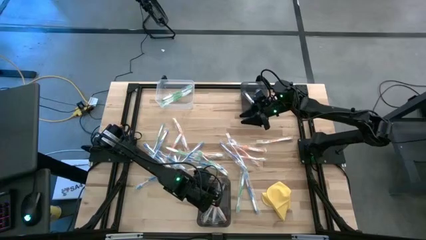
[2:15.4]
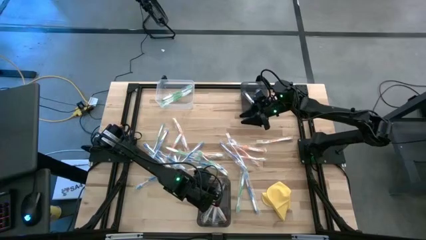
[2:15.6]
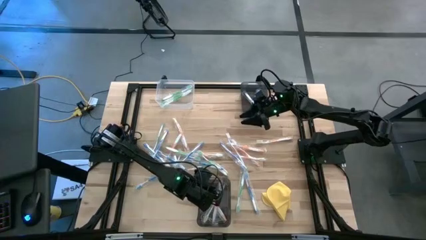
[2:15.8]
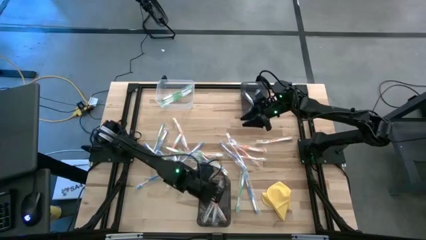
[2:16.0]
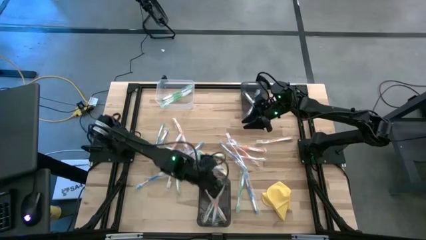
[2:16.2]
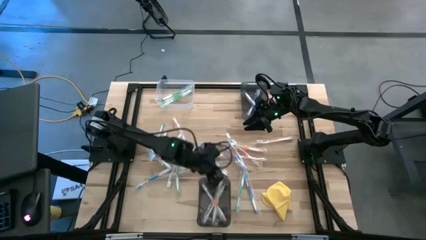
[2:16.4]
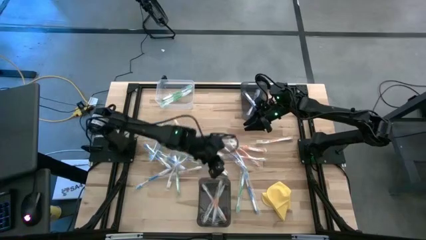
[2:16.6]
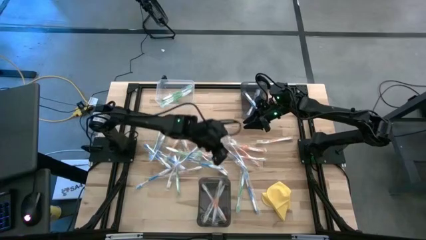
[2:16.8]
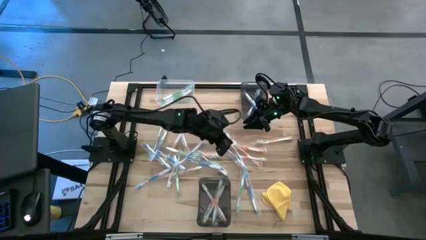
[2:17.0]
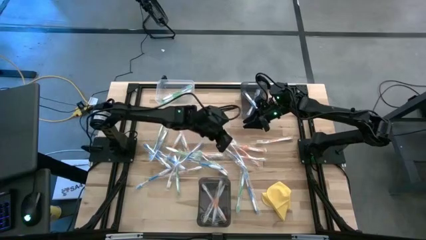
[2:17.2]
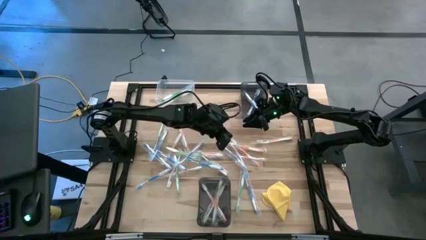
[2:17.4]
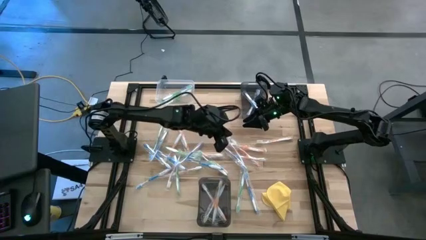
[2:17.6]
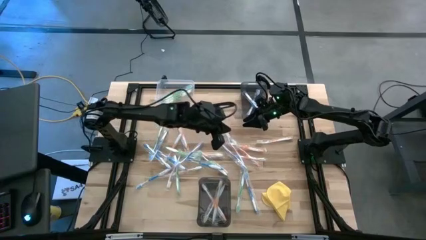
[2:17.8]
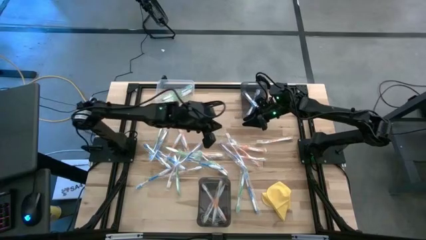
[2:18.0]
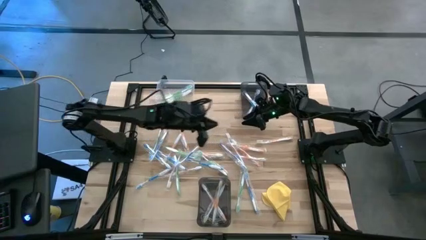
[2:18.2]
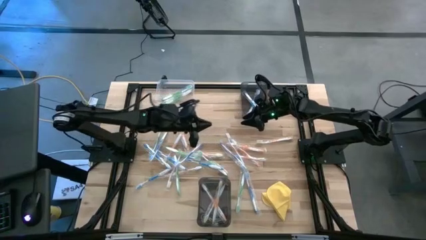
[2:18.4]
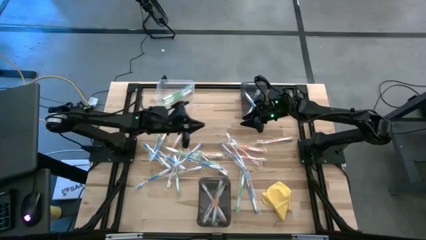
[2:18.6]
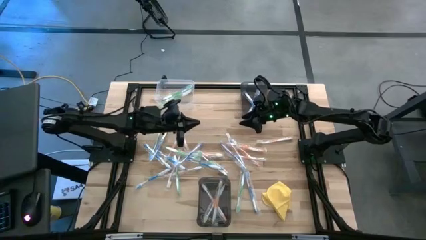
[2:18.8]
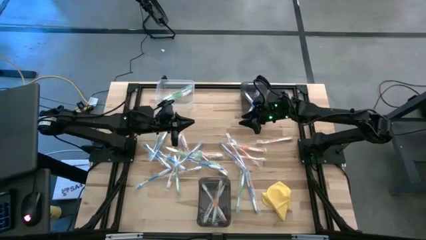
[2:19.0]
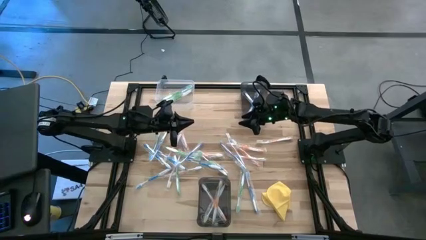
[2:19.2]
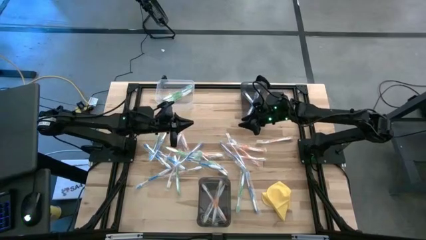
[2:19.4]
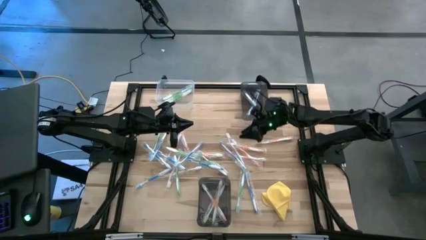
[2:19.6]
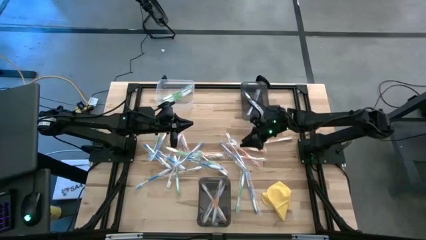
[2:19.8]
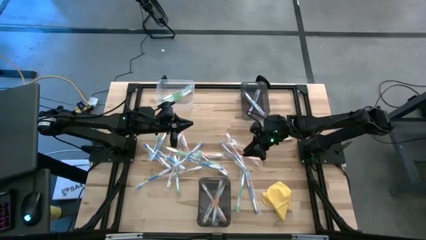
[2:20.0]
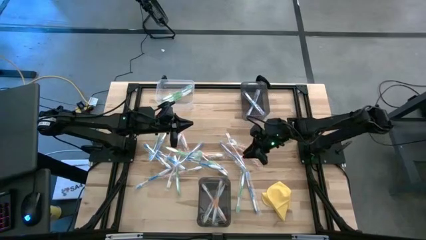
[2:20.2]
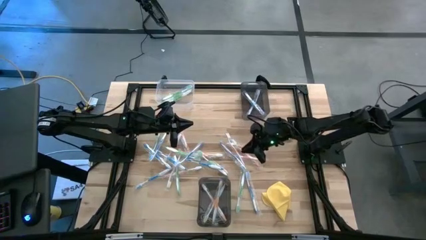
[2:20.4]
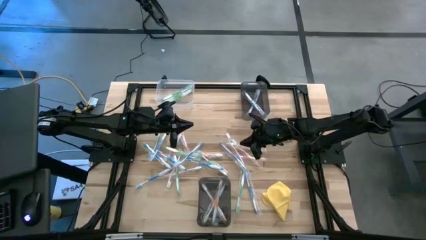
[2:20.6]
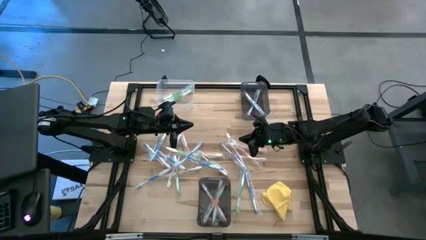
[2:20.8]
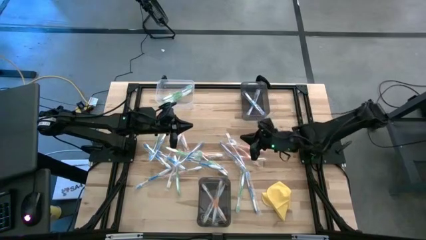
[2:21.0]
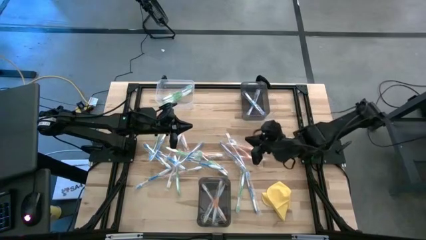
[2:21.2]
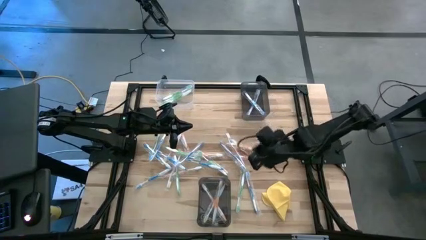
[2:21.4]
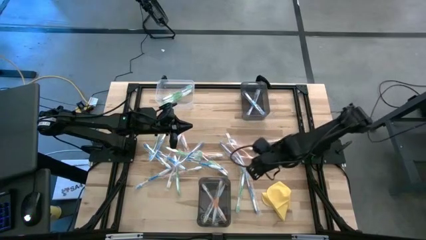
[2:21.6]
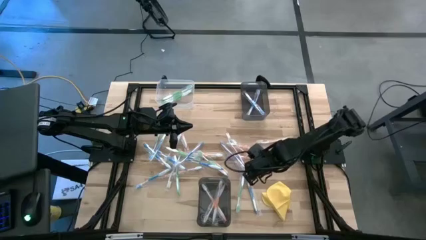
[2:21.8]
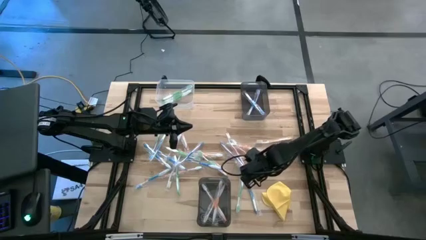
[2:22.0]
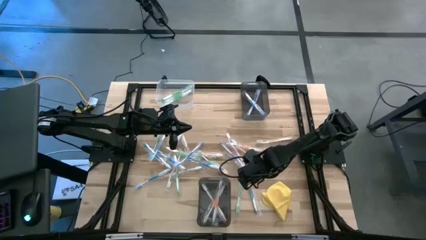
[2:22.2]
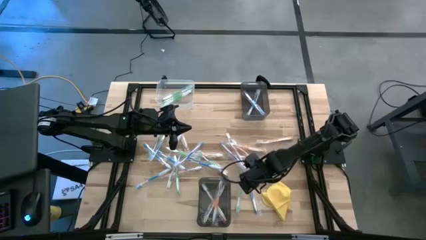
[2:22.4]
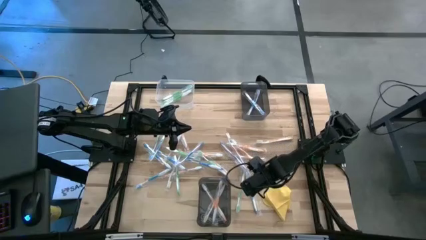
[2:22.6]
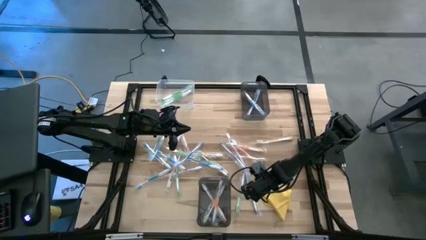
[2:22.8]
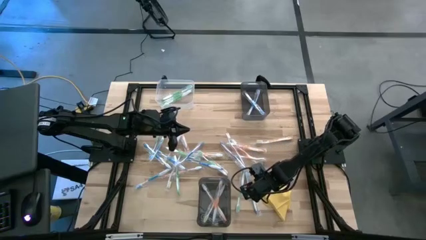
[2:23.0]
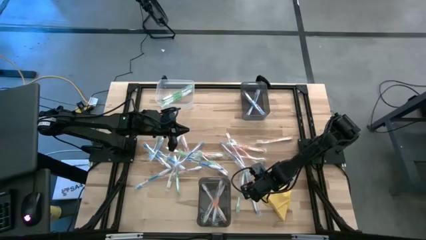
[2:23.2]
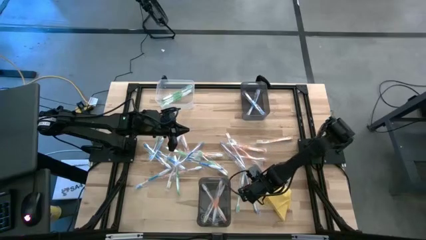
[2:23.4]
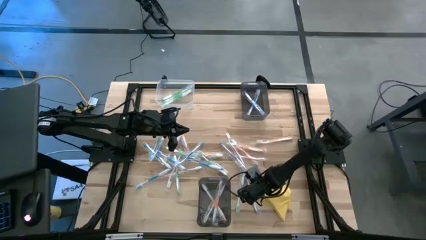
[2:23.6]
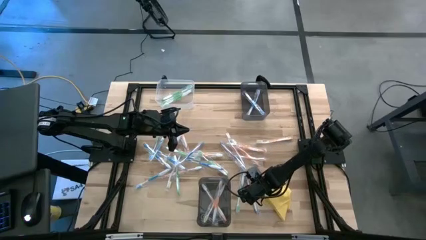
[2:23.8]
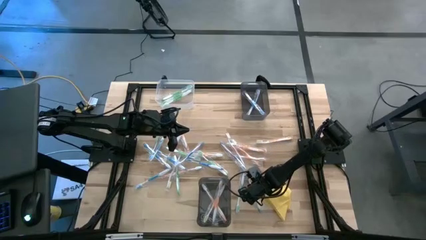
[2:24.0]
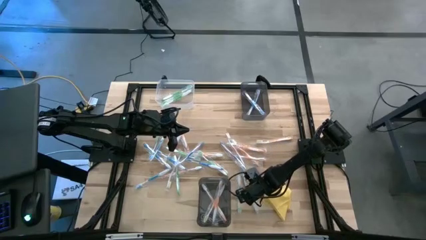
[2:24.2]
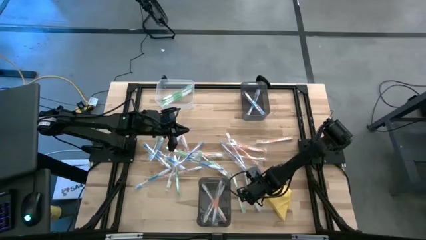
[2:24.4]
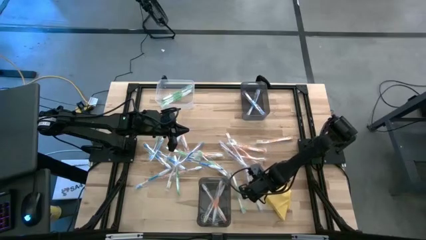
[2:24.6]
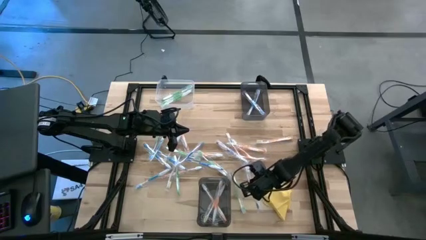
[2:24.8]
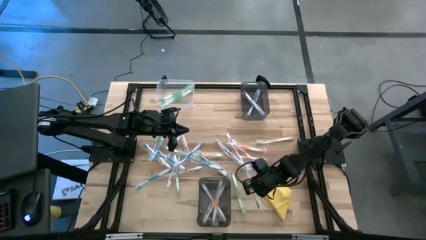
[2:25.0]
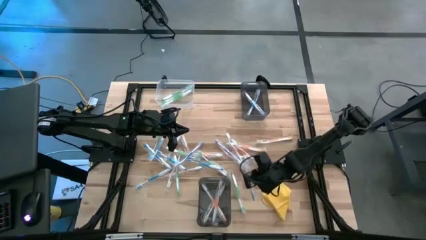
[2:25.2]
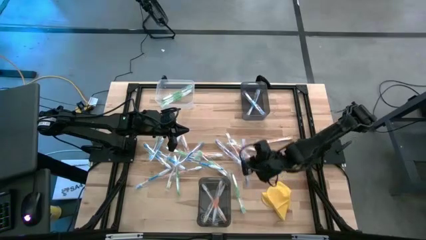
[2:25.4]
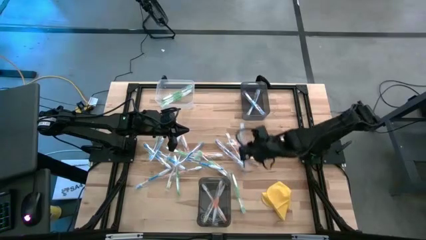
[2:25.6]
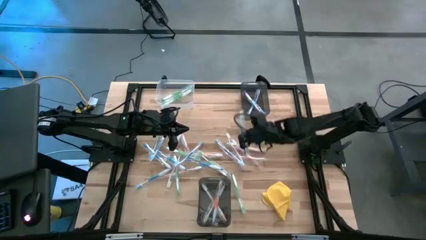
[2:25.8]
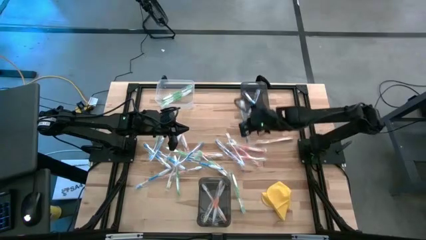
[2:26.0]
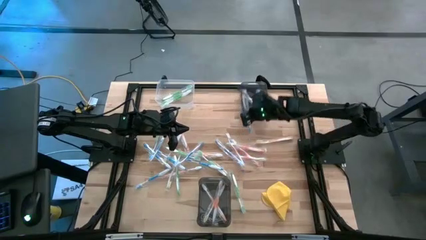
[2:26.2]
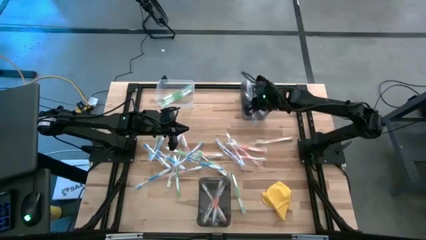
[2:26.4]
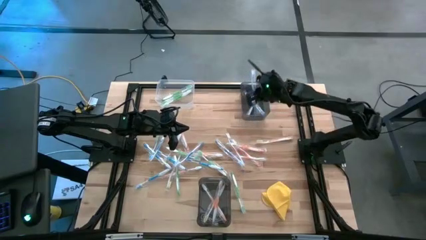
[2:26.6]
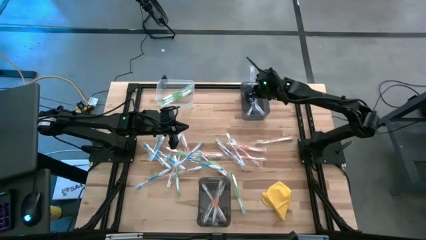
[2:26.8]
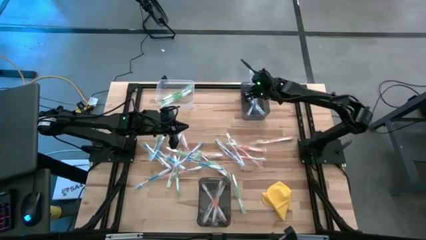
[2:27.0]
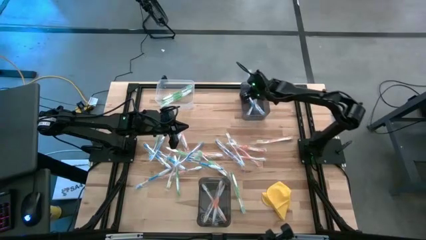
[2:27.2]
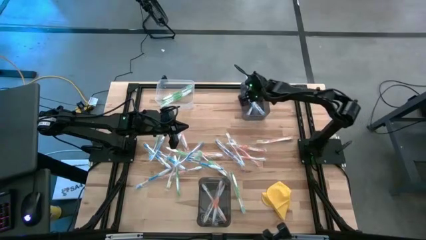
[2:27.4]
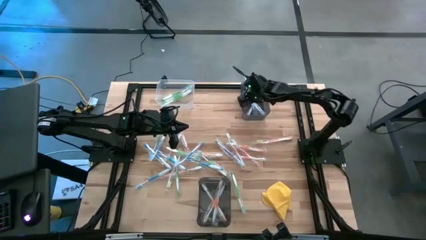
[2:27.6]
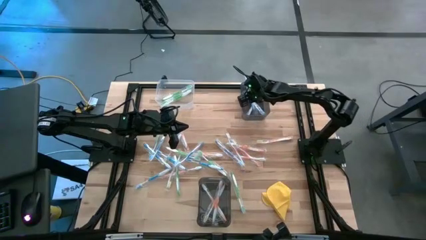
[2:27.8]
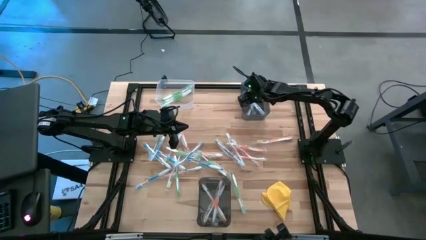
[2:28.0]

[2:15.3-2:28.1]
Task: Pick & Place Toothbrushes
Put the blue toothbrush into the top black bin

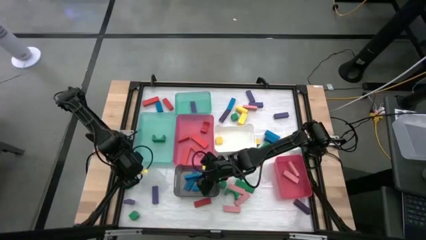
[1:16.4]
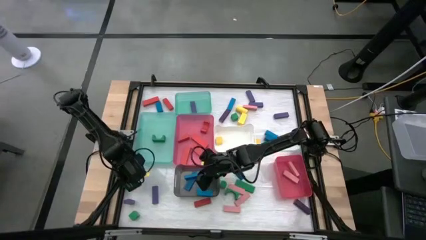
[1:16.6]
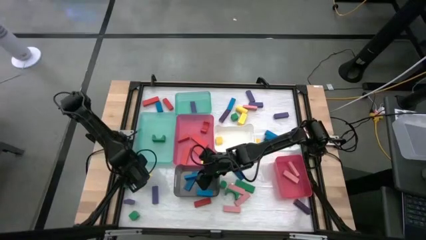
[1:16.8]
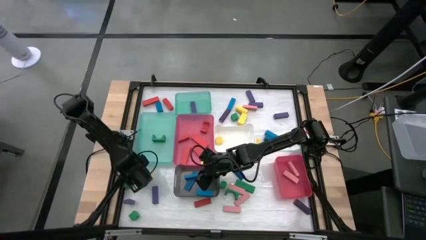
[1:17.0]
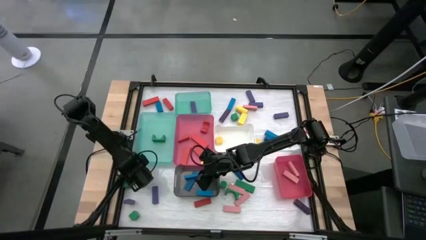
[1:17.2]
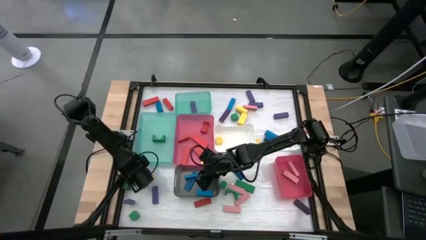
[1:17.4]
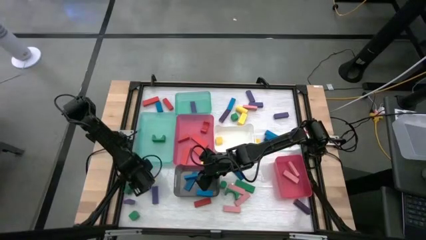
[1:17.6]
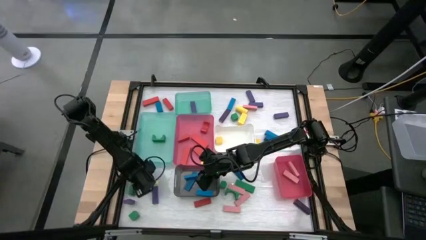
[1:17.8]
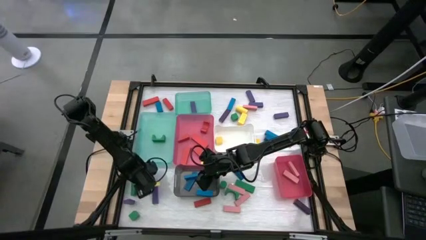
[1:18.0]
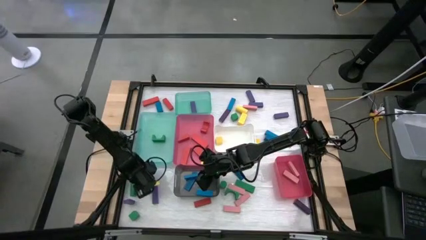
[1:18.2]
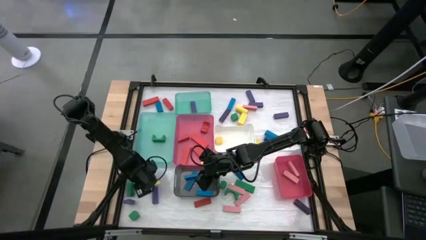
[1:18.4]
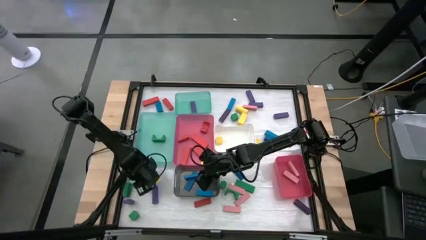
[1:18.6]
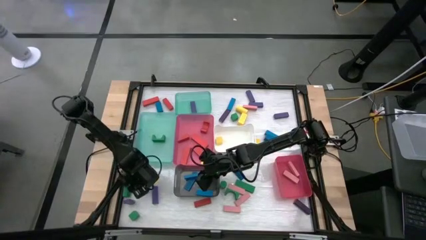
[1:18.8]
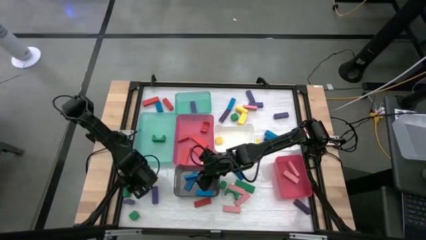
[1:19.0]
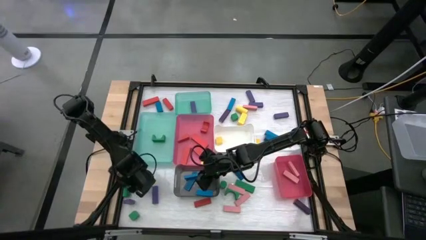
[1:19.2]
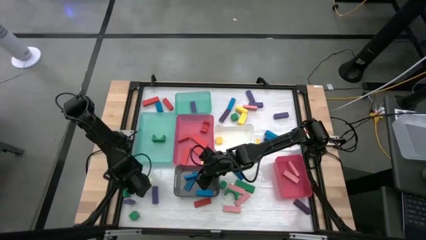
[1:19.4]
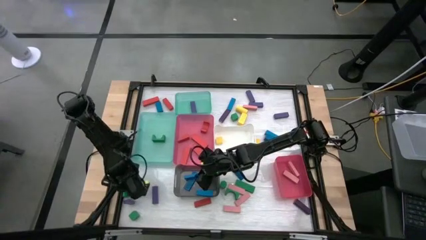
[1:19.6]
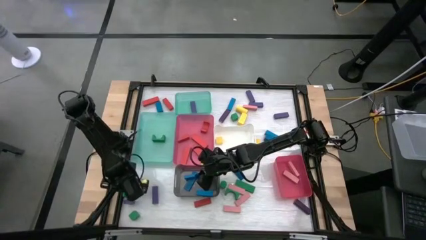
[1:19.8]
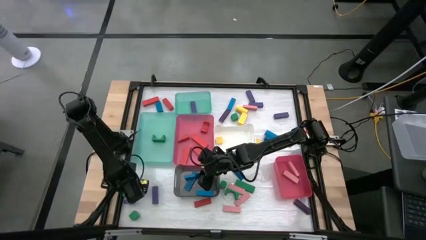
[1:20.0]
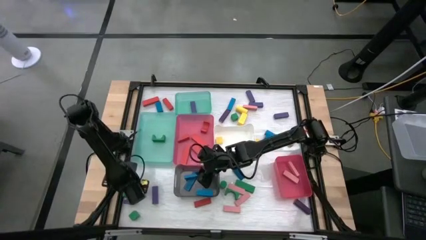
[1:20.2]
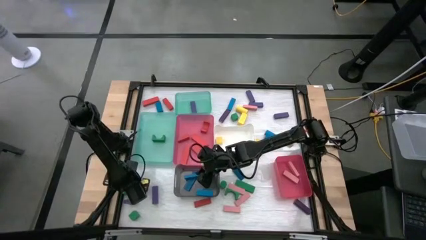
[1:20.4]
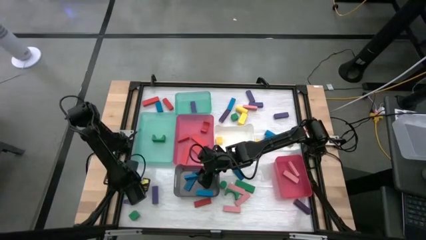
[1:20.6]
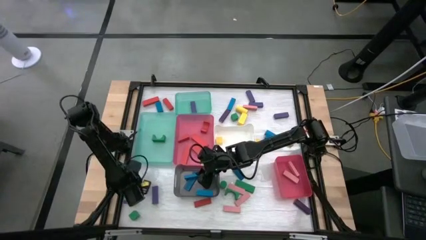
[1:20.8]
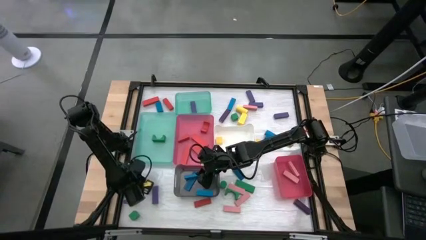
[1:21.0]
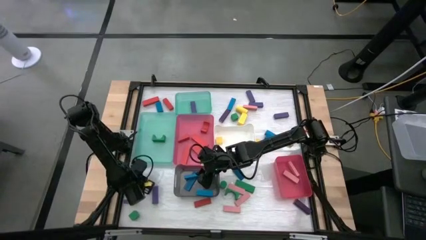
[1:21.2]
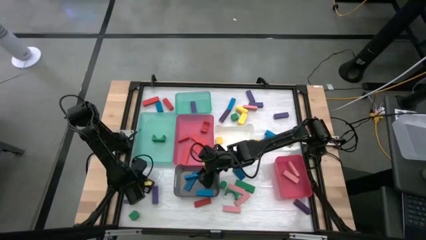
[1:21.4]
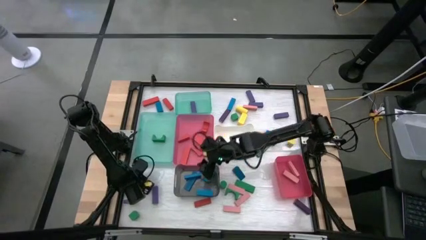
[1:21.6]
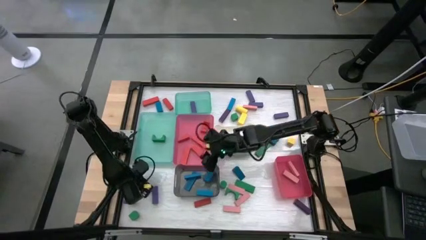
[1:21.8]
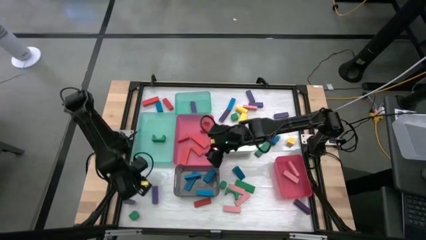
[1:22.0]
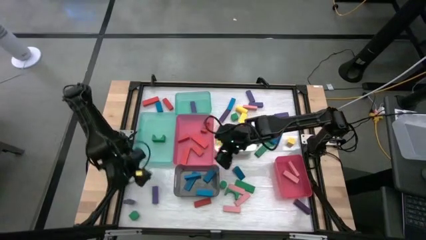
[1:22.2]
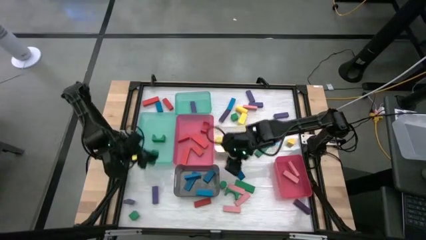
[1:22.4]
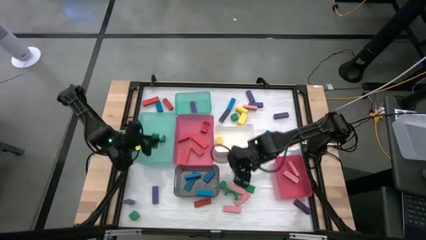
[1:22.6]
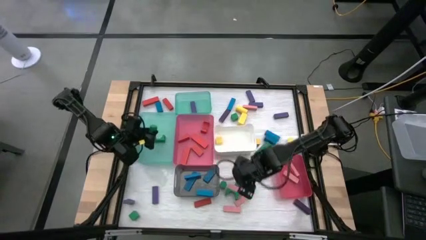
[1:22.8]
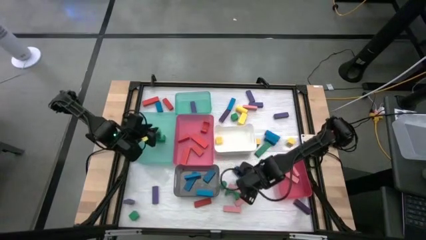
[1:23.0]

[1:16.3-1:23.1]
Task: Sort blocks
Put the green block into the bottom green bin
